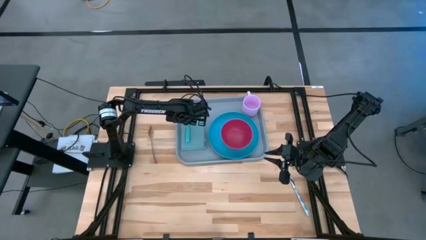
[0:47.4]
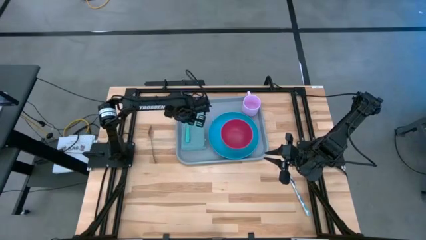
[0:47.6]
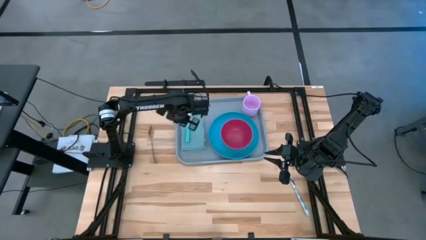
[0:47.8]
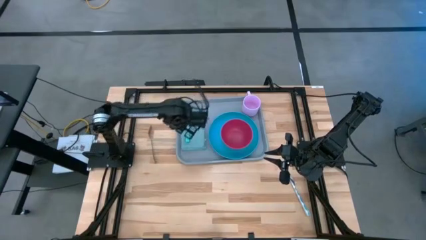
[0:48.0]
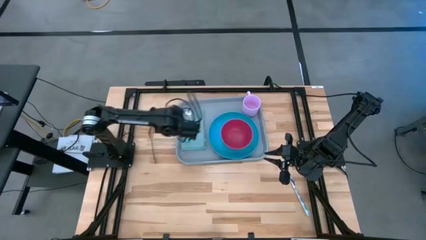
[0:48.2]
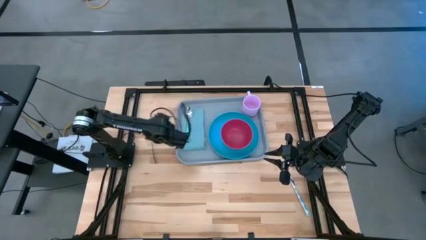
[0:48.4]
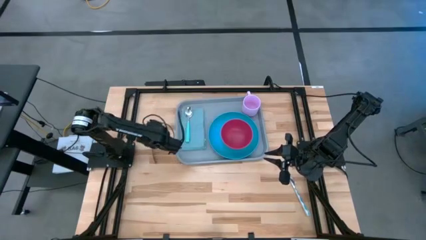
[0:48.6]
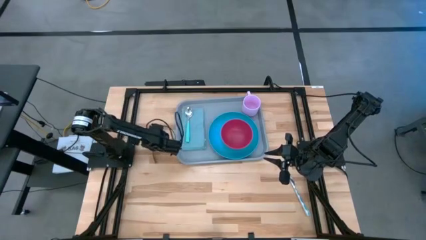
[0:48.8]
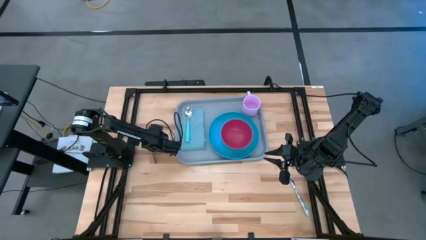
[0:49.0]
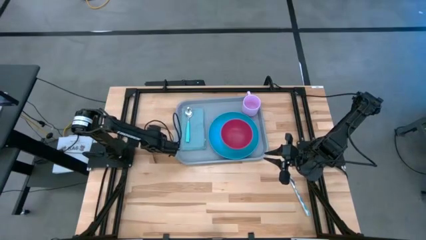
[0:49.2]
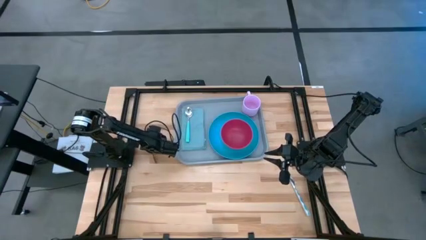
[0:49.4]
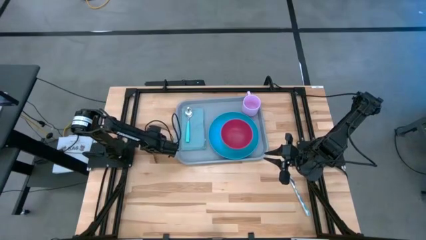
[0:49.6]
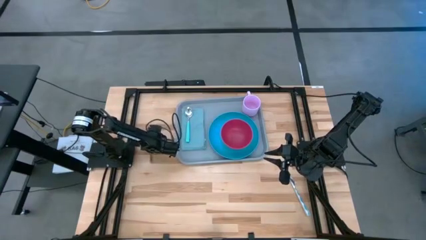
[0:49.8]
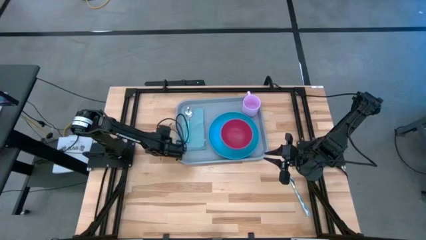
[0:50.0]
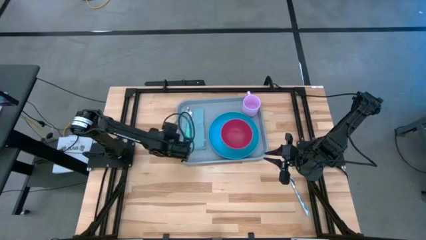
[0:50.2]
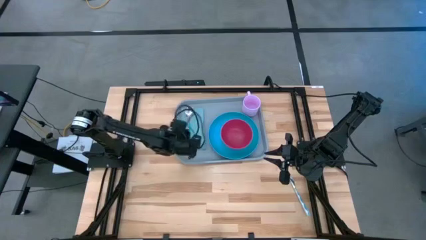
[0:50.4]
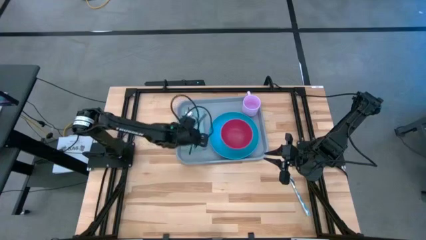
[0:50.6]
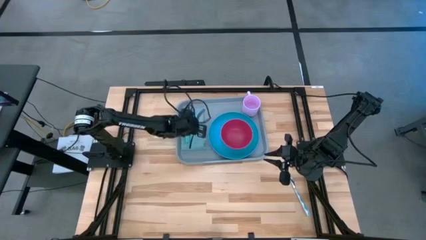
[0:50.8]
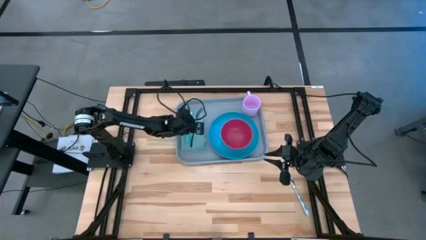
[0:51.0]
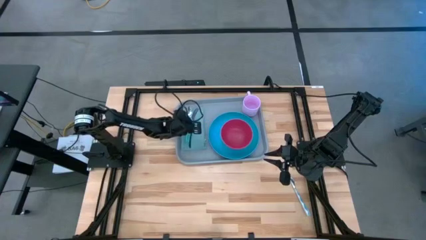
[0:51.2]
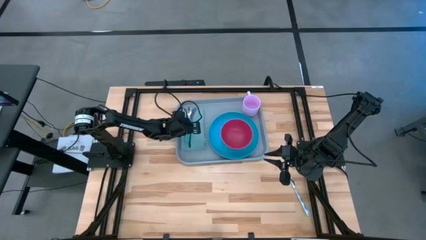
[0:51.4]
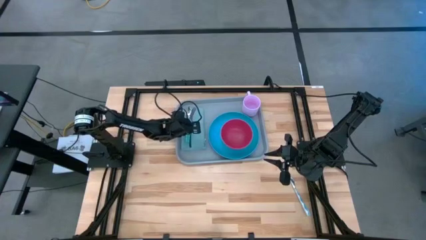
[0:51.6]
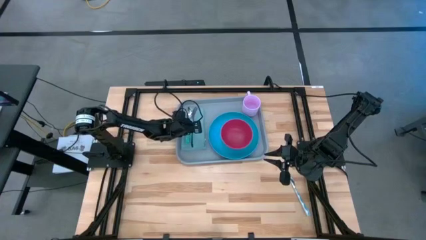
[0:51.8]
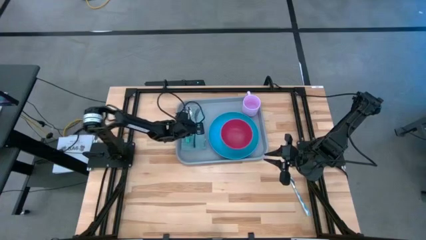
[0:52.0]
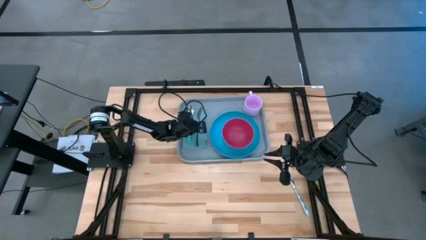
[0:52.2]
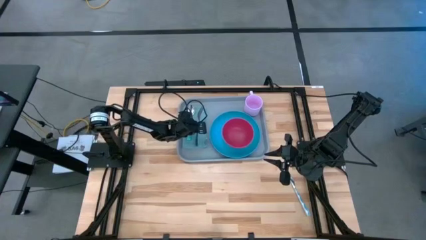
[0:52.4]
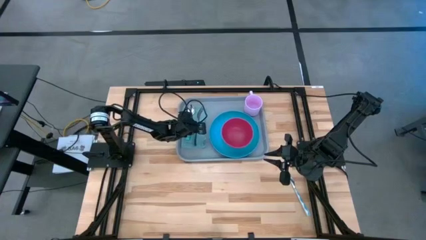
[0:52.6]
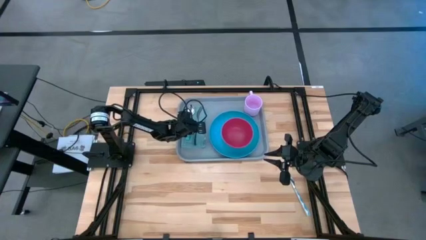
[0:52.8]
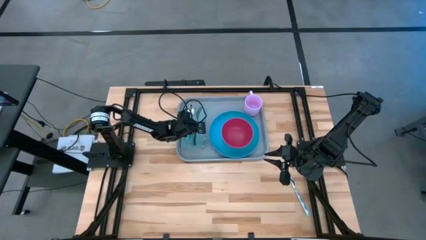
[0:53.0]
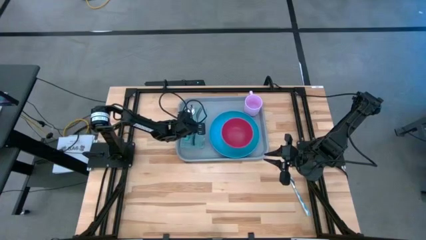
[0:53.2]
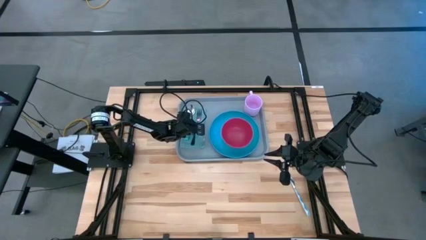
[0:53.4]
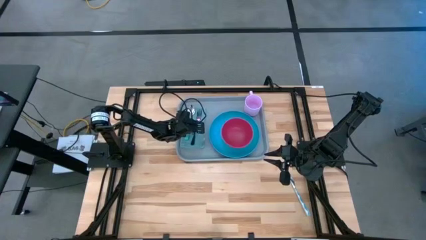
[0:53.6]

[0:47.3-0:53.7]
Task: Set up tray
Put the iridescent fork on the blue napkin

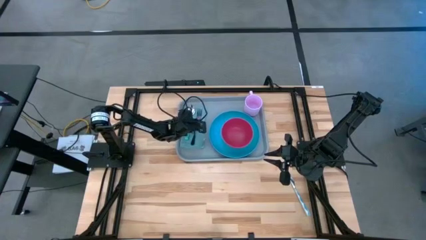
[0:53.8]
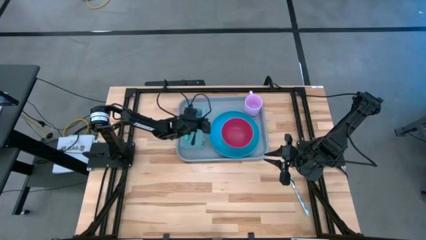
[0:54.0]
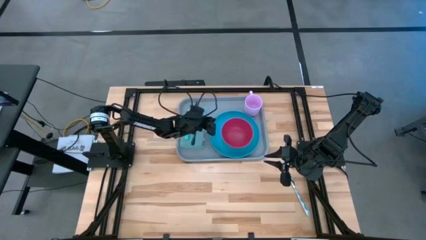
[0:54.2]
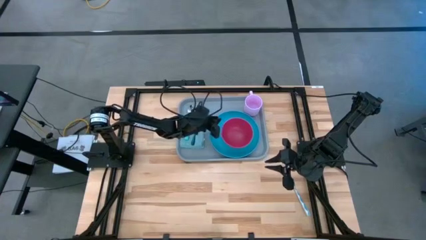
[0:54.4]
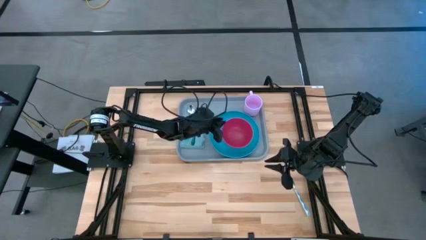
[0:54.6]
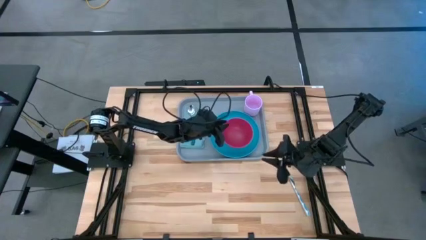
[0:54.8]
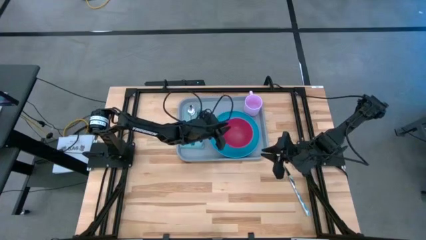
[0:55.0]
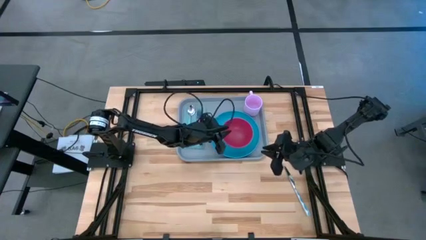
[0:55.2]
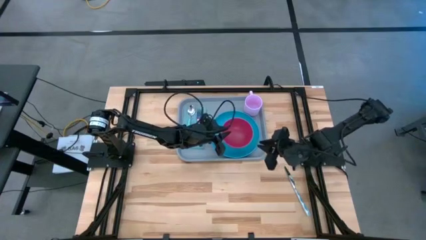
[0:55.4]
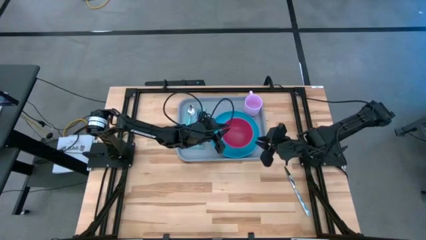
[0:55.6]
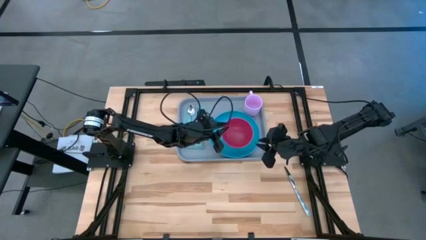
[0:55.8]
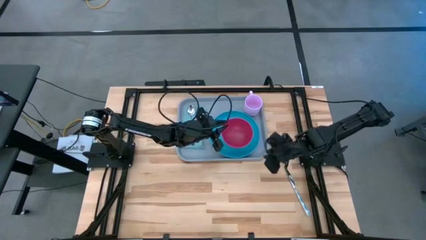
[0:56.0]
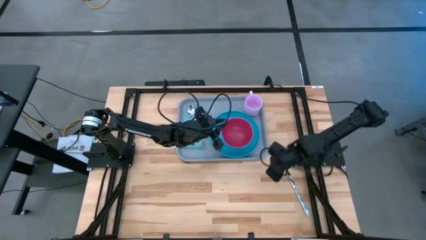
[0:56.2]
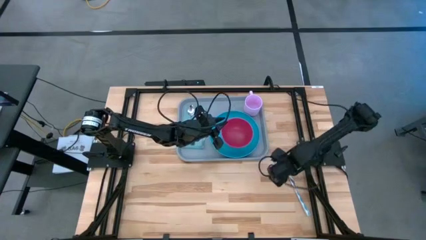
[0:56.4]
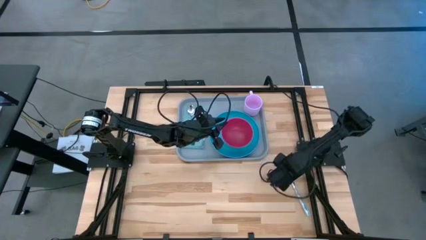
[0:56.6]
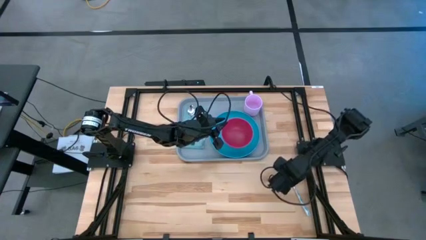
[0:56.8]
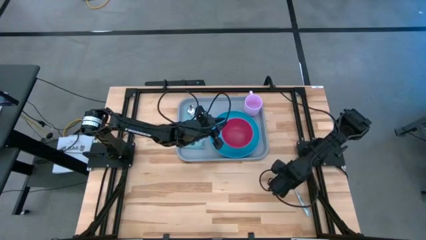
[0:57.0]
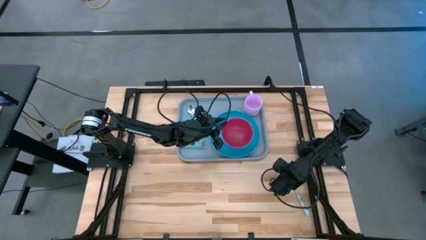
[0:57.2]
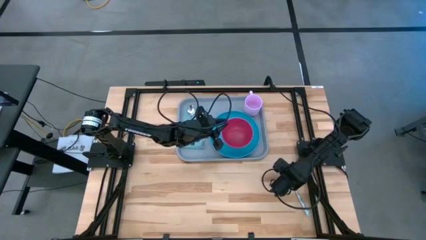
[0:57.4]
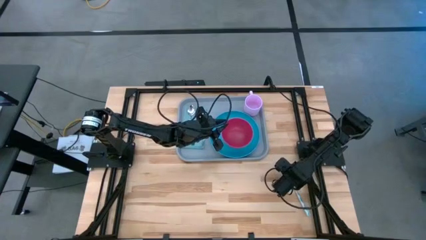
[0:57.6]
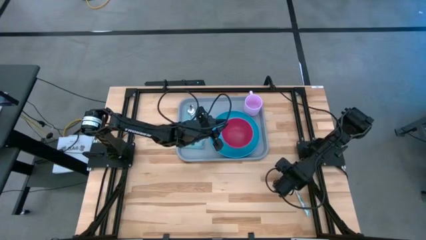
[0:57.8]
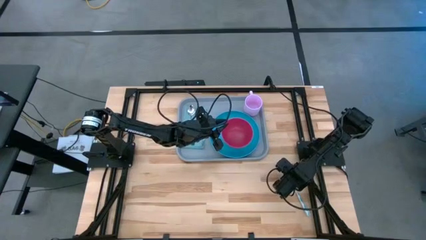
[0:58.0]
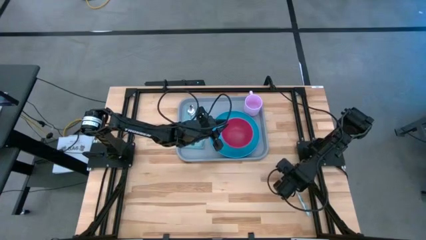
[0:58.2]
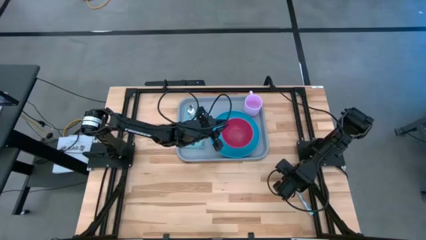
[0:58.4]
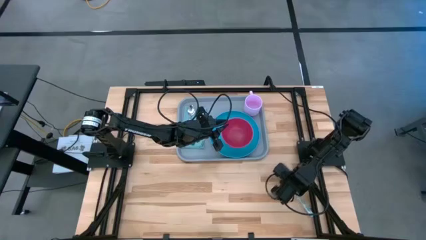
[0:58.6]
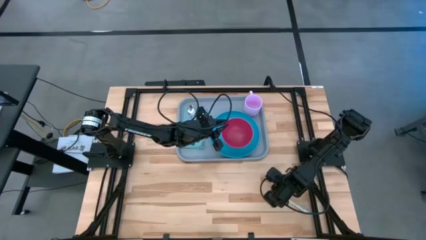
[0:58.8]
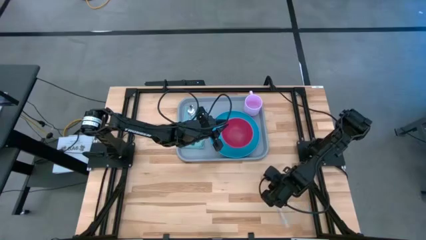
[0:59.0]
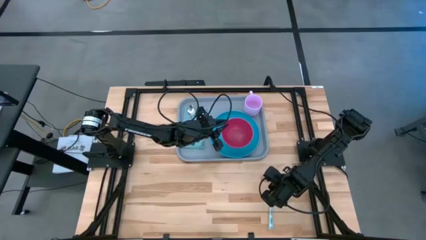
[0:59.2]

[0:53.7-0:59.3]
Put the white knife on the blue napkin

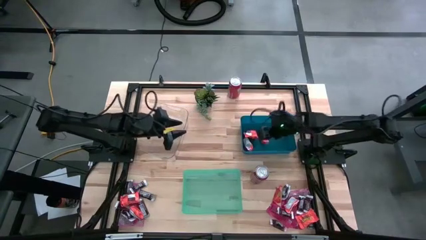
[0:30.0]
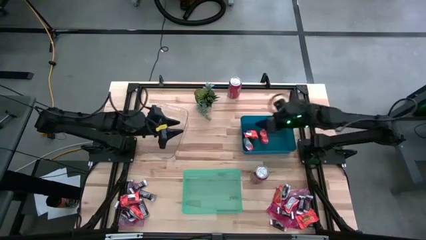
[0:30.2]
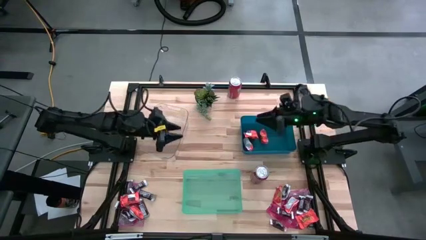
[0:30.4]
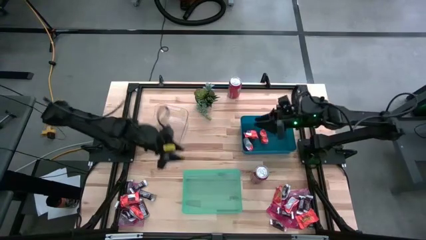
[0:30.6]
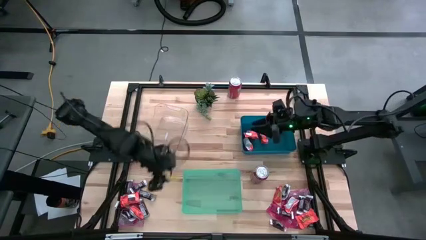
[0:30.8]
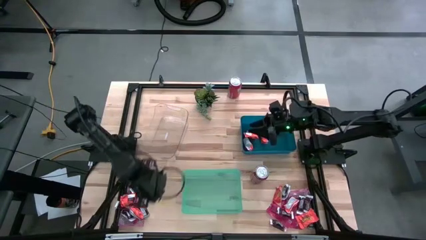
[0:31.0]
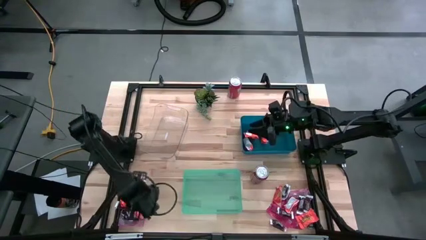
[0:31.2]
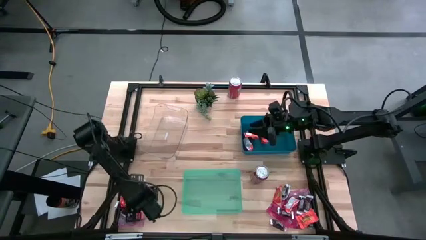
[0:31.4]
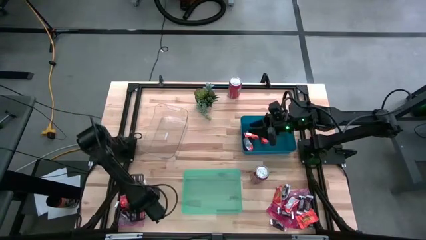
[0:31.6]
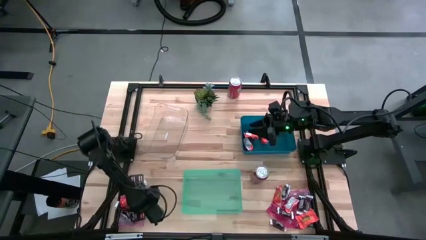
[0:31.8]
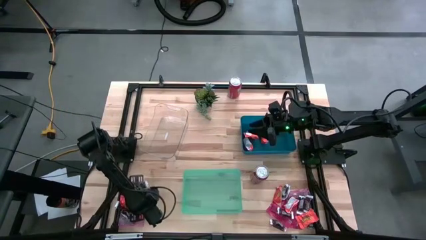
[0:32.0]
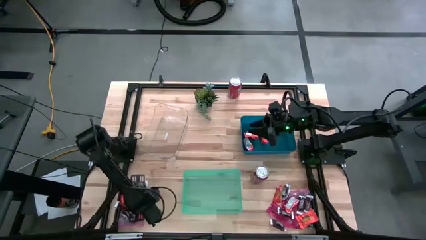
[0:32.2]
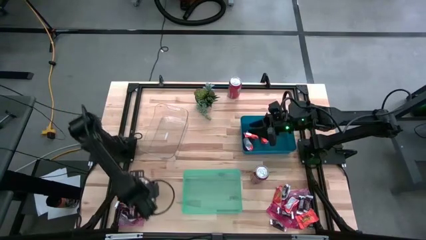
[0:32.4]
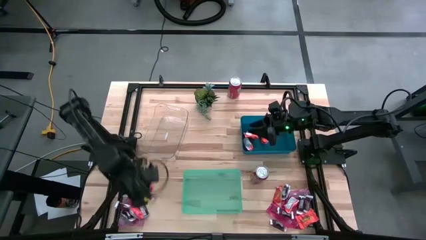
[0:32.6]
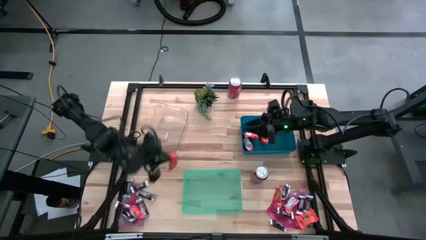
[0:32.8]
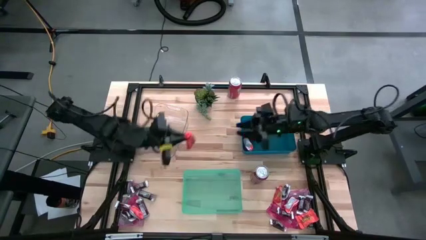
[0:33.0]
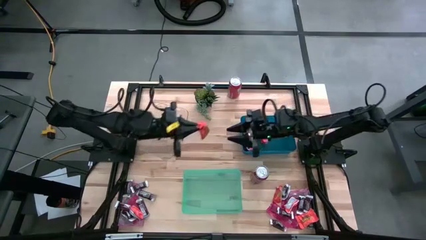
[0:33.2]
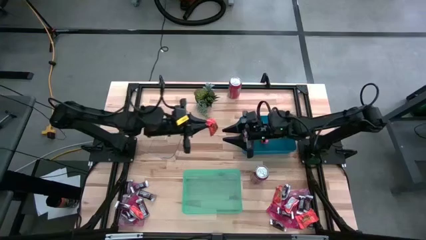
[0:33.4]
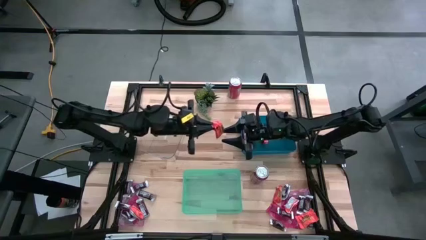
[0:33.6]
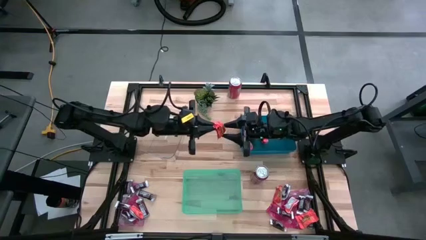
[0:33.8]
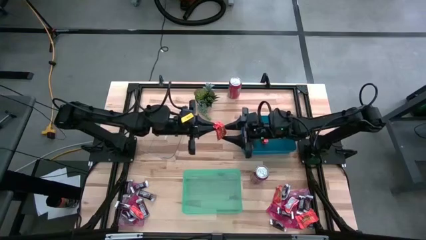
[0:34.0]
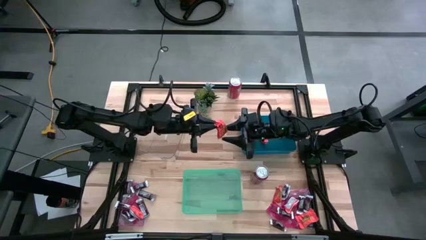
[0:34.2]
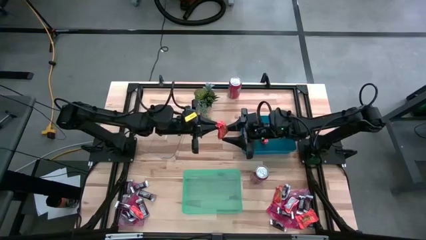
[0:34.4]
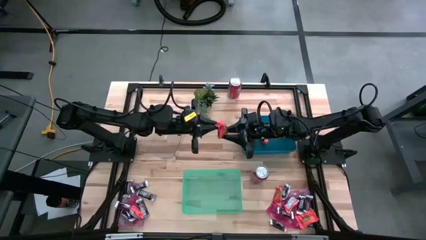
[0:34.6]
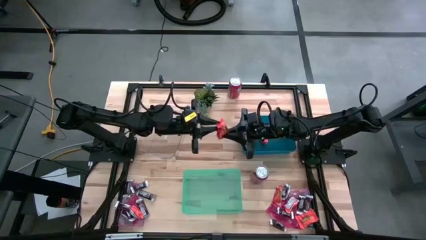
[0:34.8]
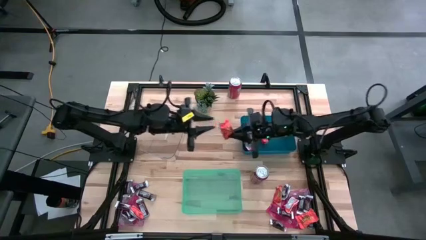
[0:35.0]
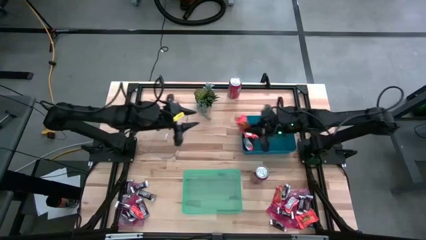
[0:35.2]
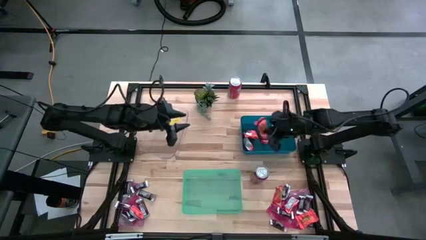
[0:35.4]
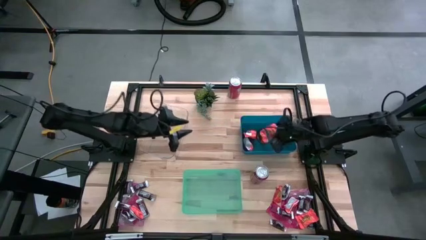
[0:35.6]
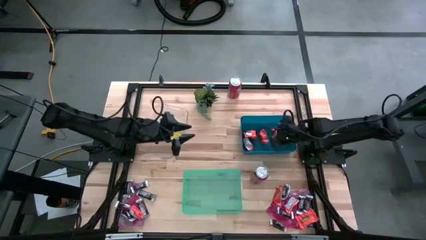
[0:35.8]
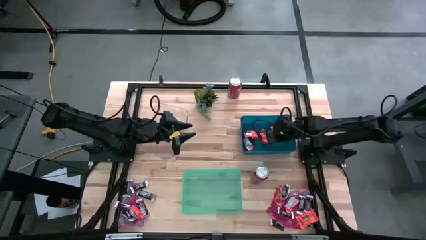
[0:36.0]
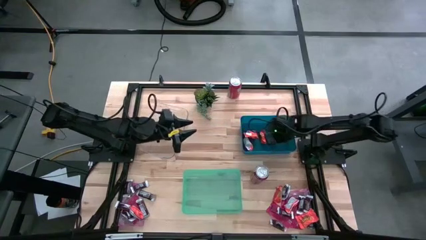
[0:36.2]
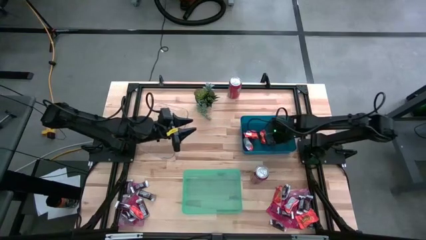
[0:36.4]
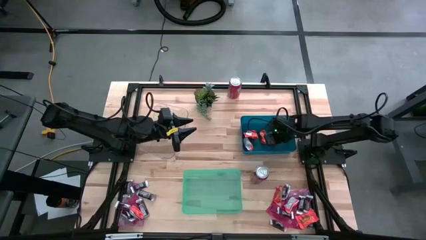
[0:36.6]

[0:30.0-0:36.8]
Task: Sort candy
Put the orange chocolate into the blue bin
